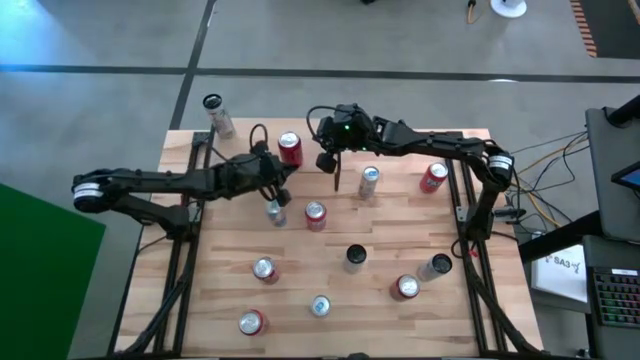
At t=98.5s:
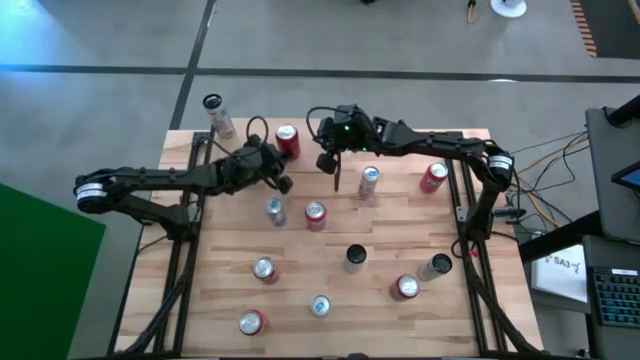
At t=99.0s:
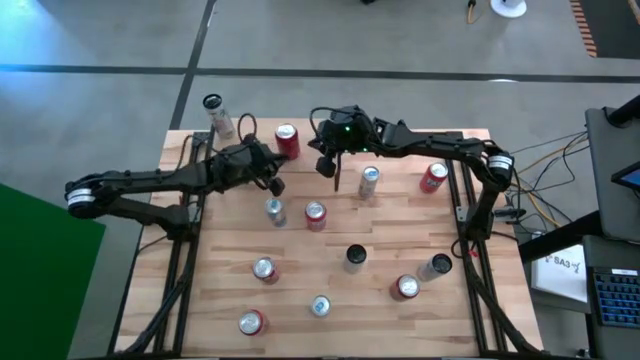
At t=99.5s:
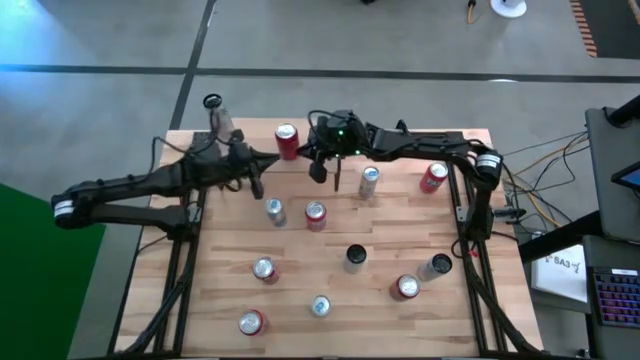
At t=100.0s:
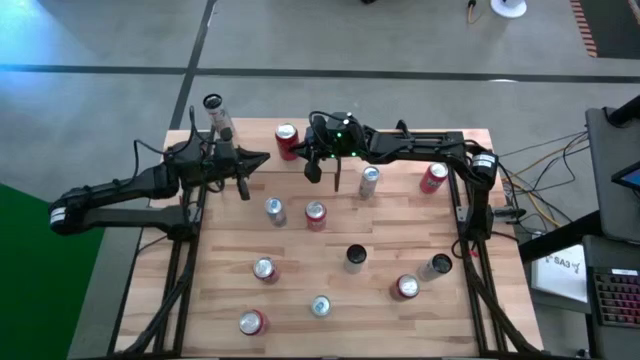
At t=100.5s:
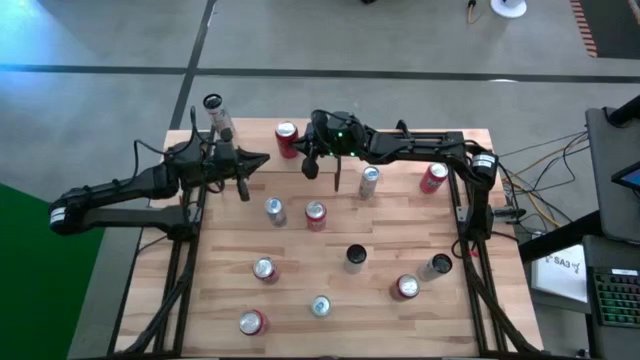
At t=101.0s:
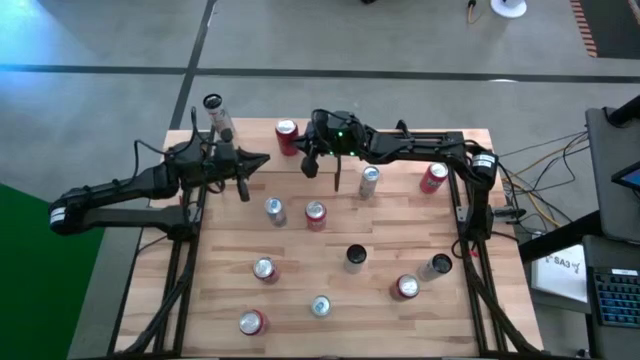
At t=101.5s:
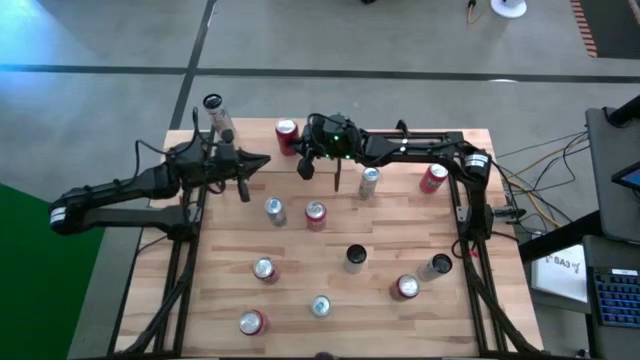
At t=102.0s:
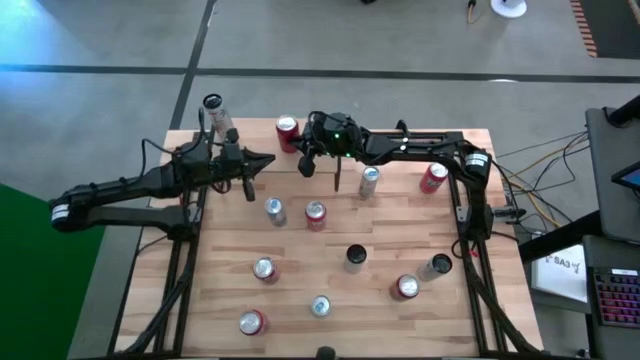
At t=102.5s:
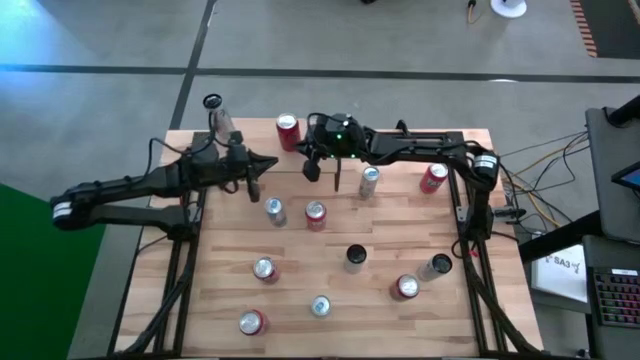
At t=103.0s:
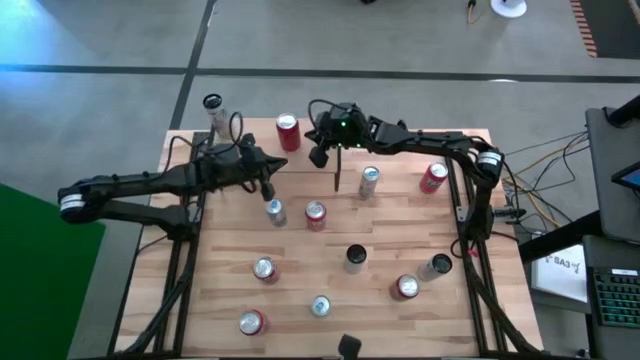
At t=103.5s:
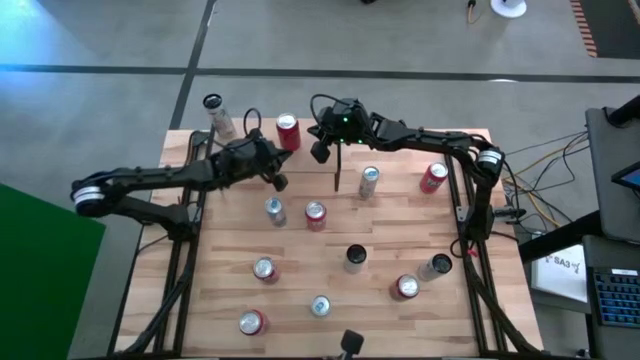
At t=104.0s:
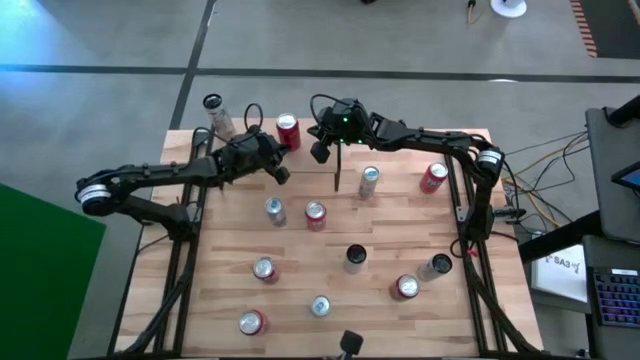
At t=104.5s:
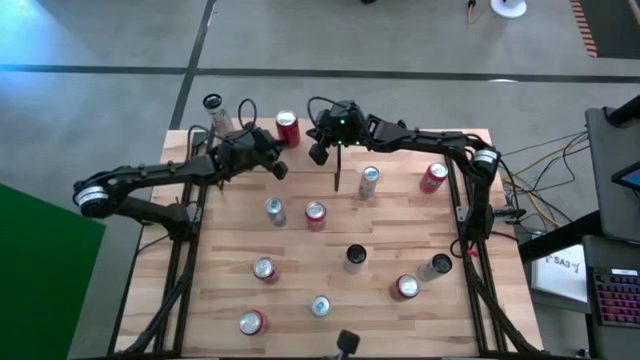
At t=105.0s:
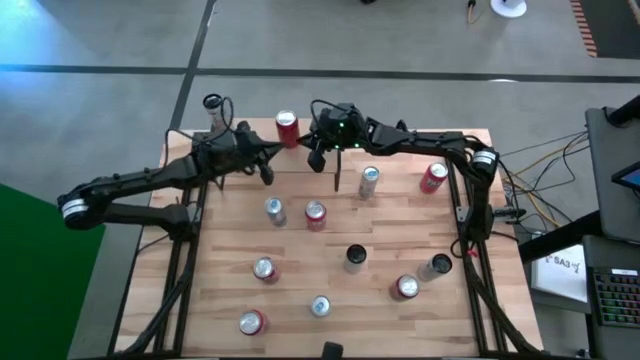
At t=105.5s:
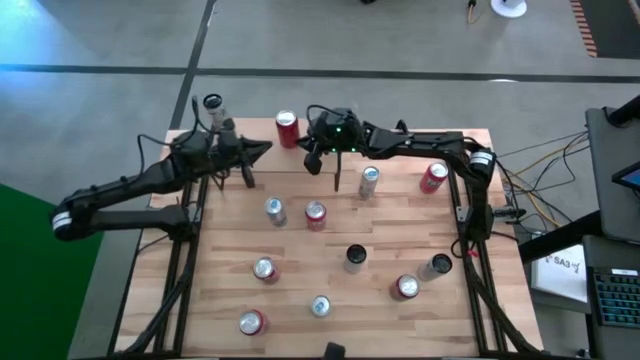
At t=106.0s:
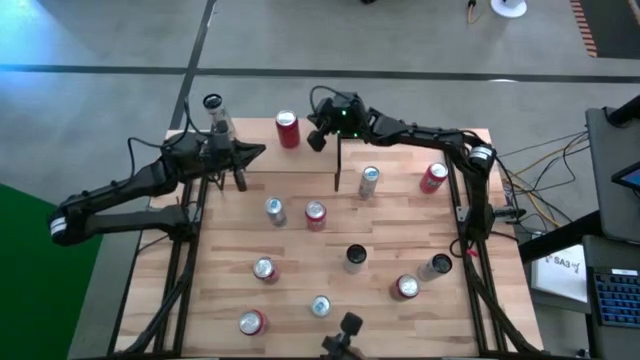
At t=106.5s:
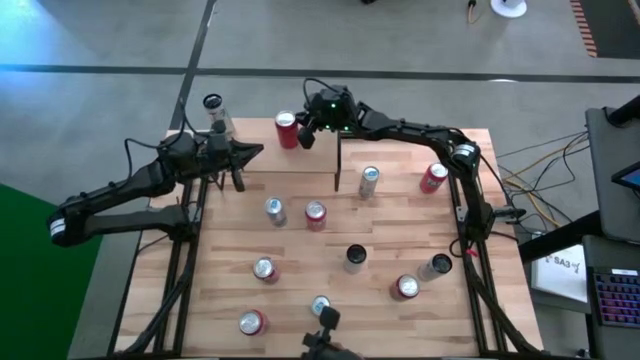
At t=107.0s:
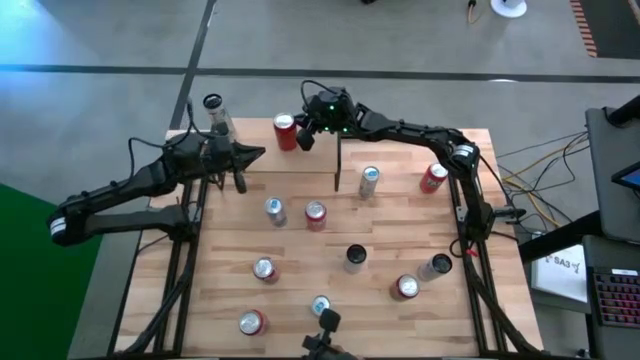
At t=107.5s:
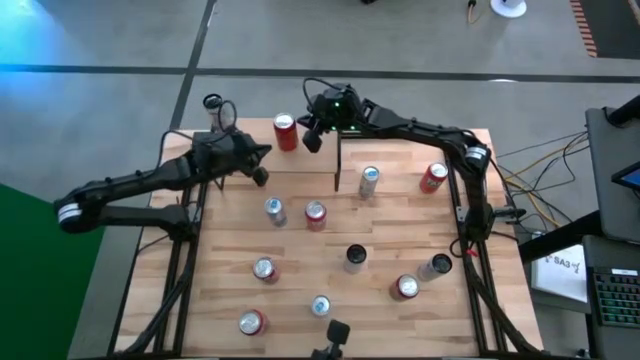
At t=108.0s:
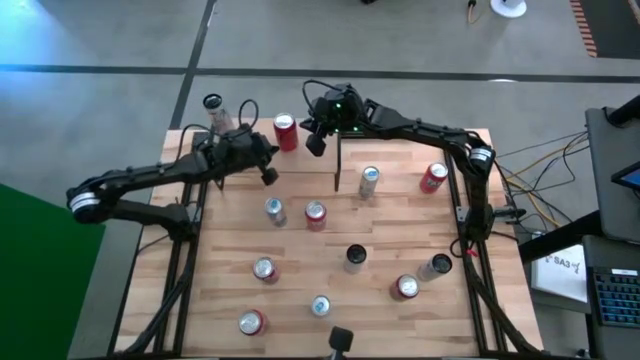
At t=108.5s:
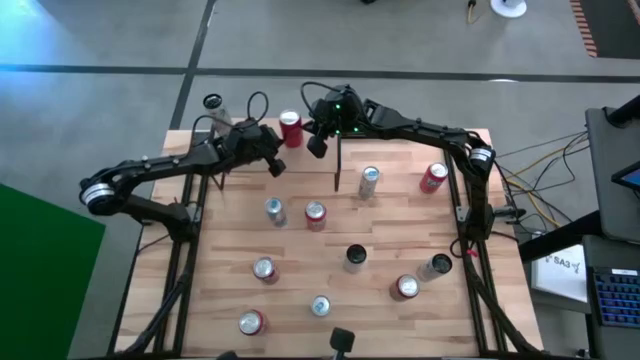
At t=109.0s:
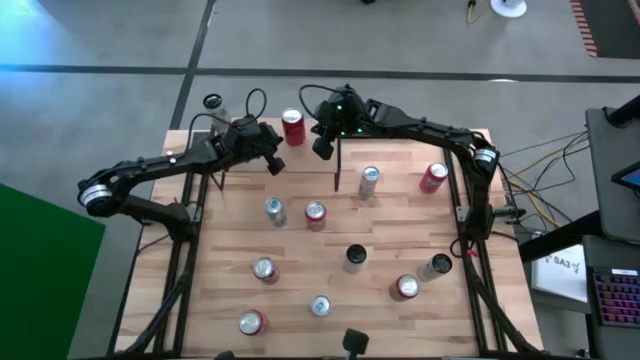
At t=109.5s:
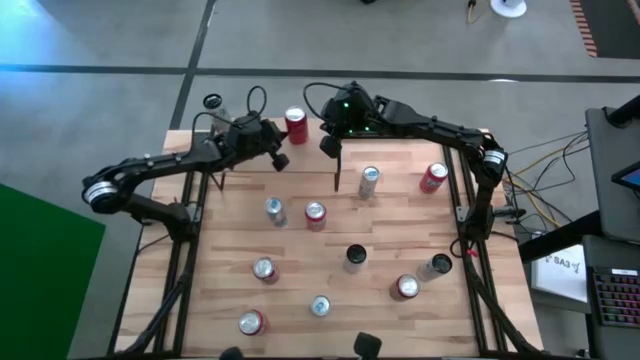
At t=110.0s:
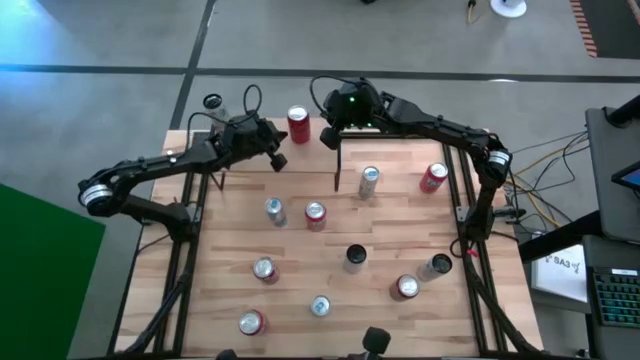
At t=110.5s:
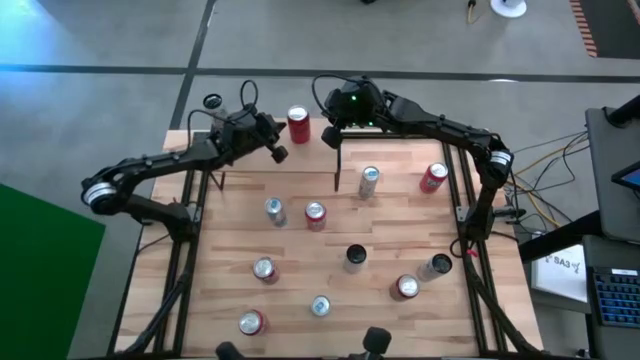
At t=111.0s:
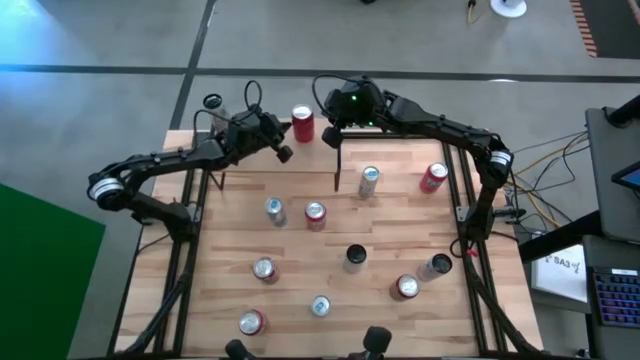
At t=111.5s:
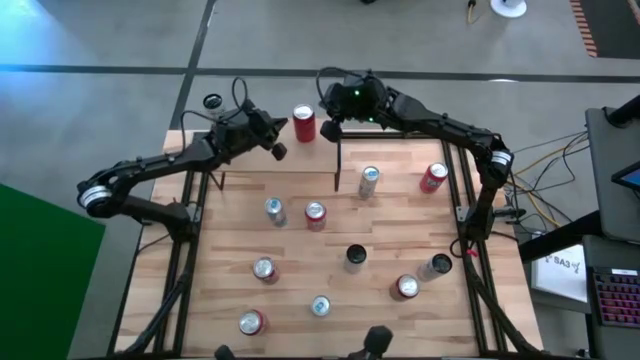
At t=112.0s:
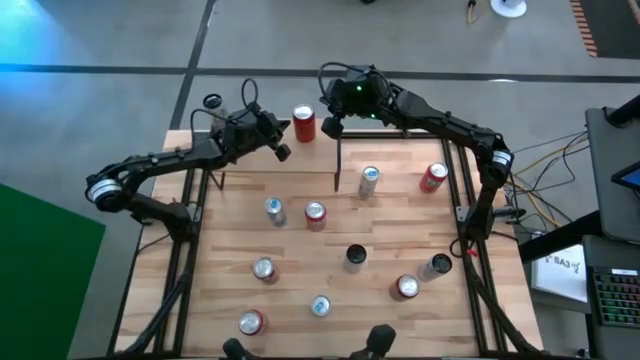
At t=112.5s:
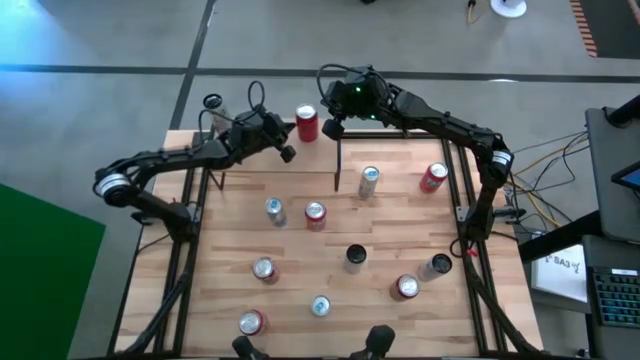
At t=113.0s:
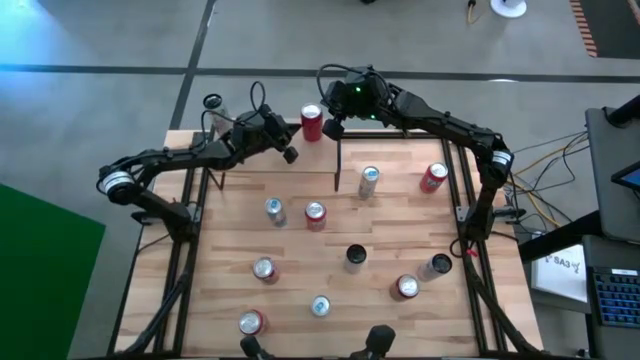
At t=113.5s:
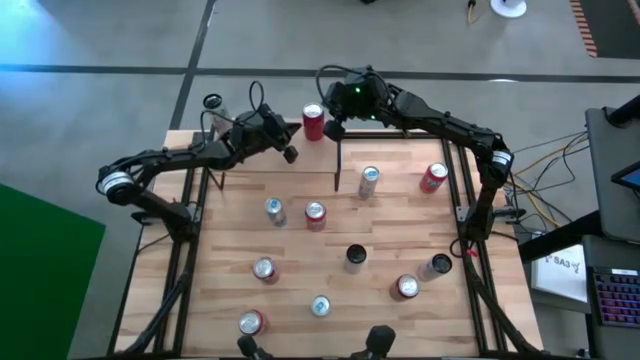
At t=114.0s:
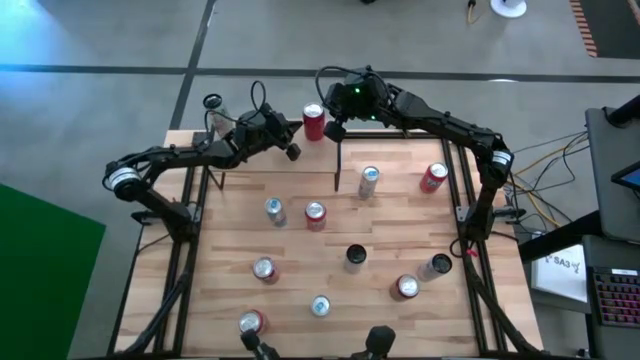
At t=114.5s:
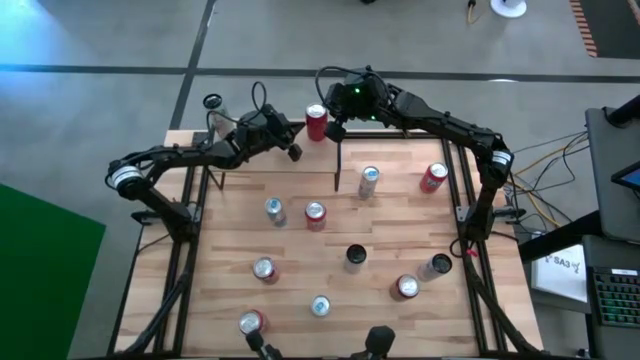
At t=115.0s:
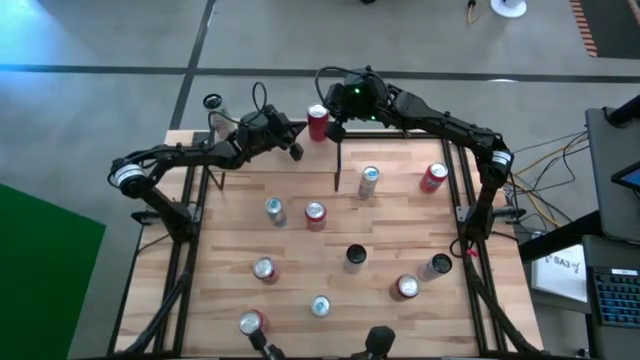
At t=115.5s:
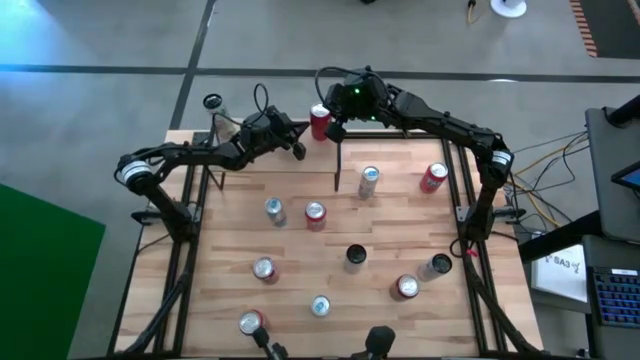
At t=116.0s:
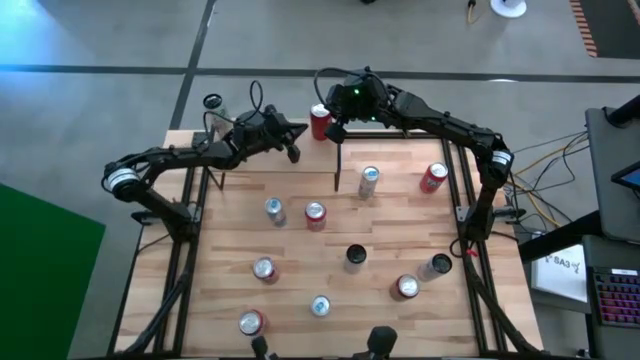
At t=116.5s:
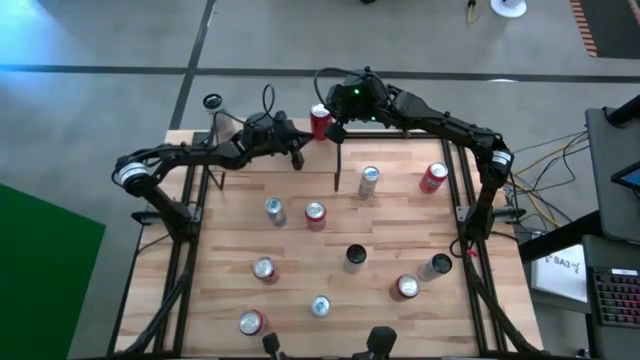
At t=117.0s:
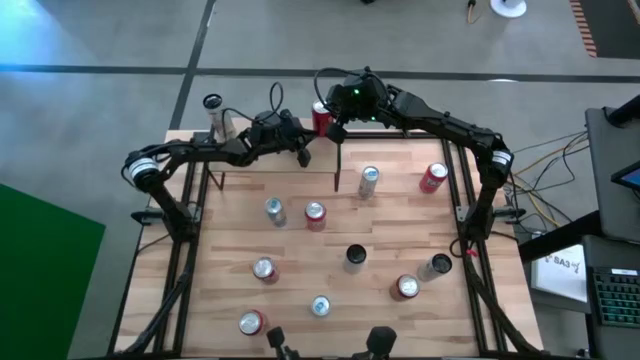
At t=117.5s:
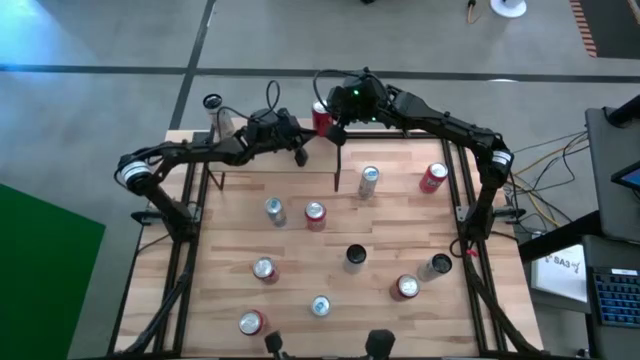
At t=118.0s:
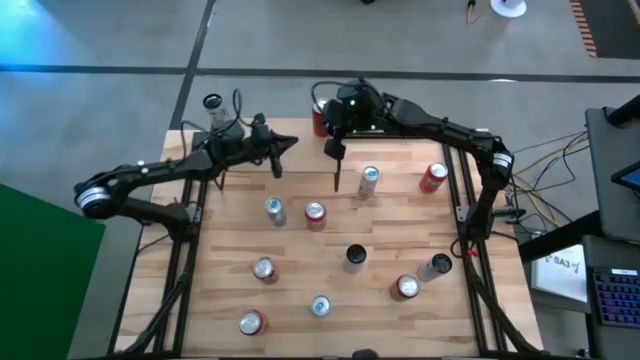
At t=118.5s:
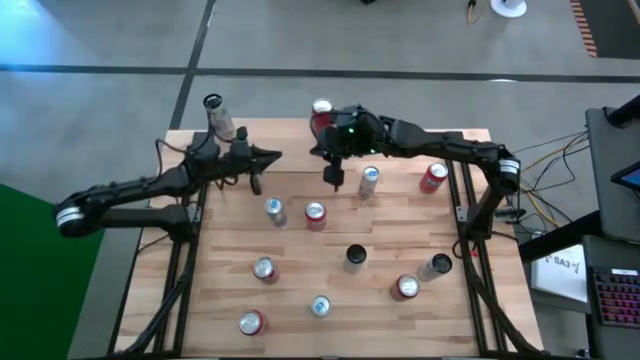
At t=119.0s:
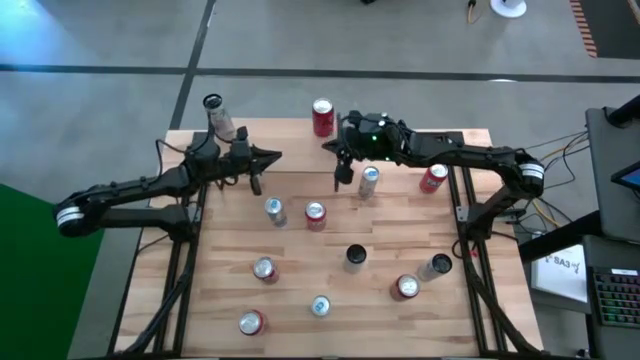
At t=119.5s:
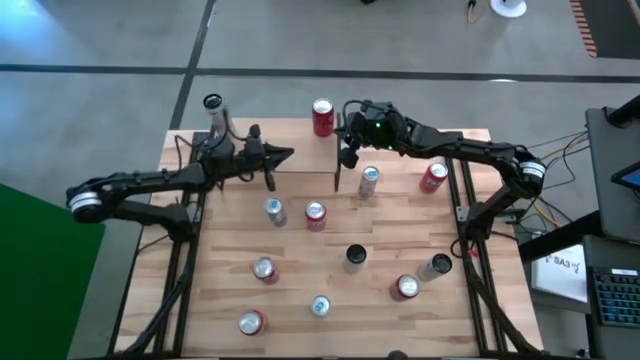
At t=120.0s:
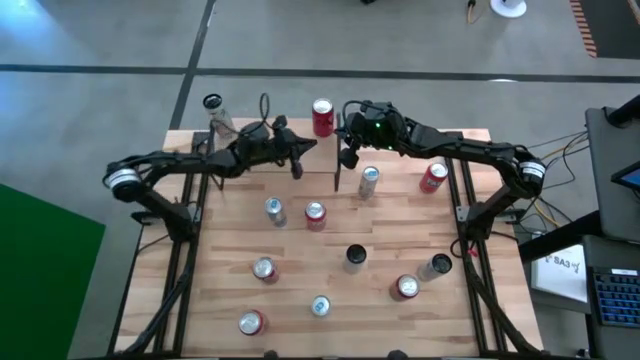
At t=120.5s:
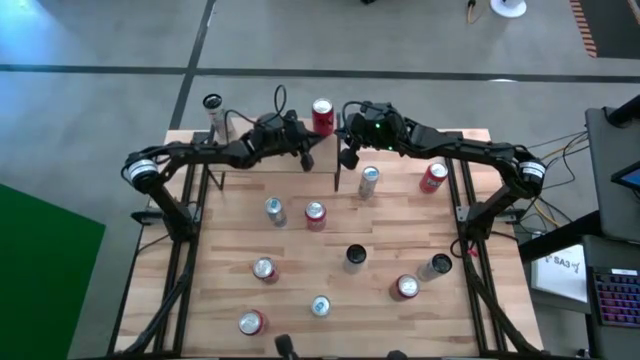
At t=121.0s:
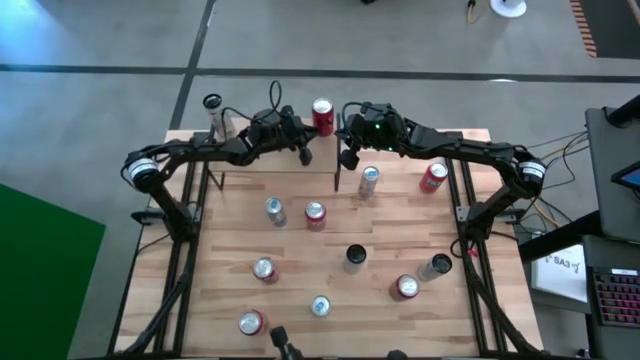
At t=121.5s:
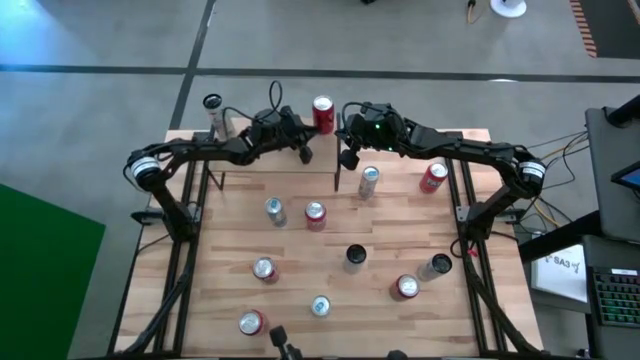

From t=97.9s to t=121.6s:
Task: Place canned beverage on shelf
Put the red black soda can on the shelf
